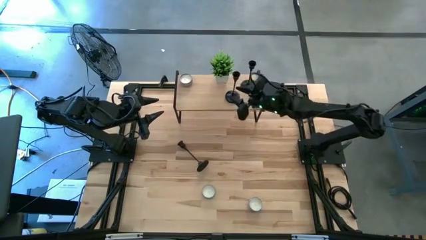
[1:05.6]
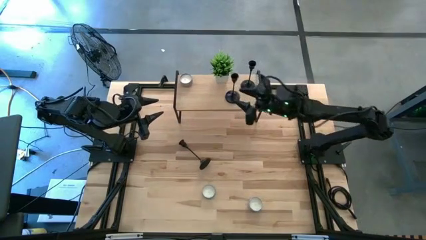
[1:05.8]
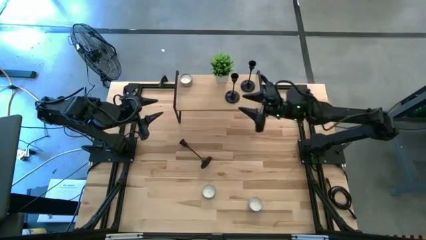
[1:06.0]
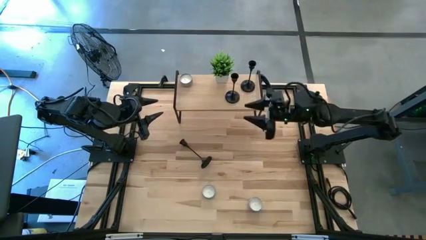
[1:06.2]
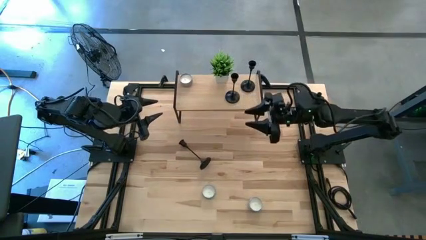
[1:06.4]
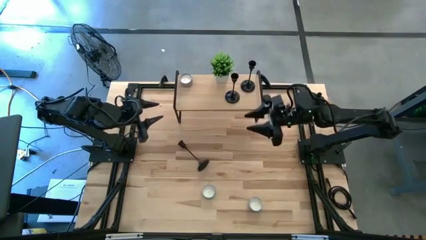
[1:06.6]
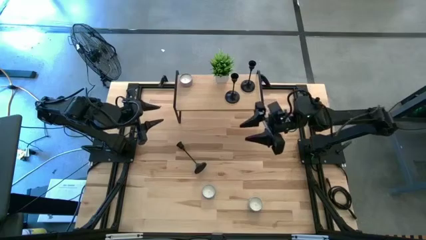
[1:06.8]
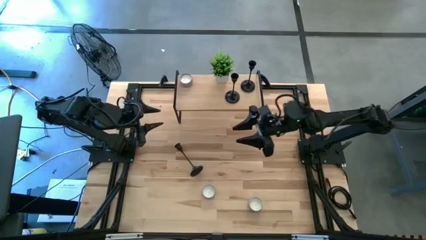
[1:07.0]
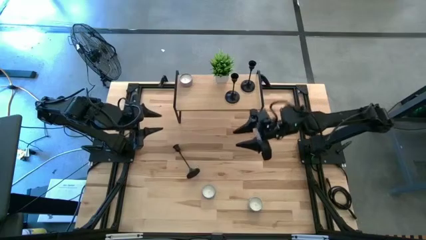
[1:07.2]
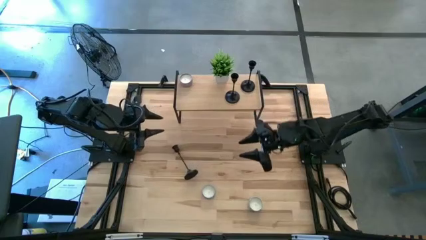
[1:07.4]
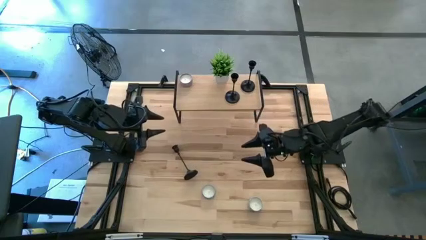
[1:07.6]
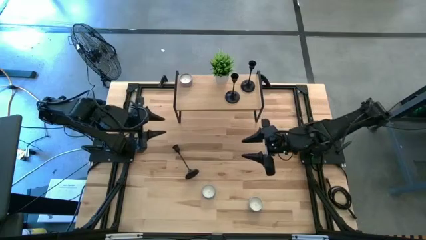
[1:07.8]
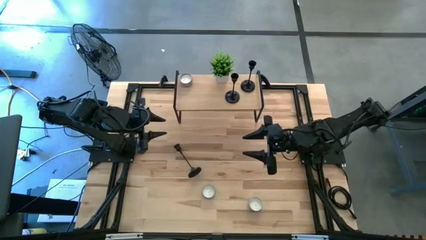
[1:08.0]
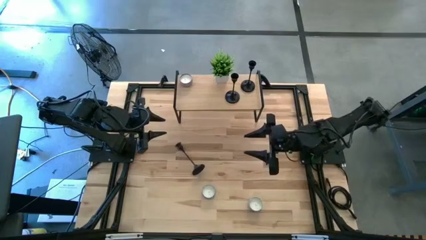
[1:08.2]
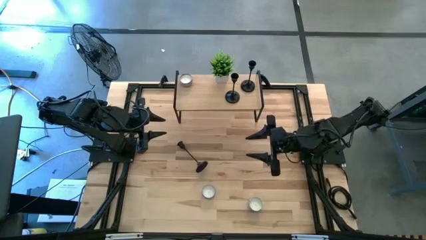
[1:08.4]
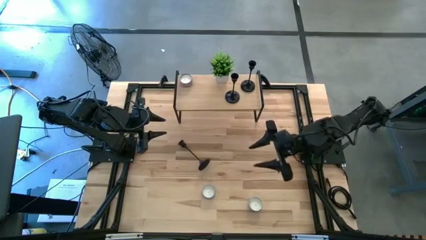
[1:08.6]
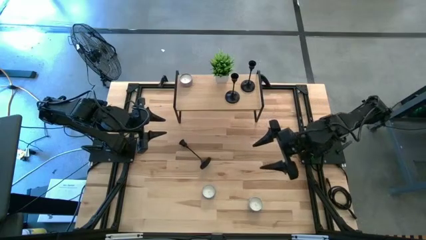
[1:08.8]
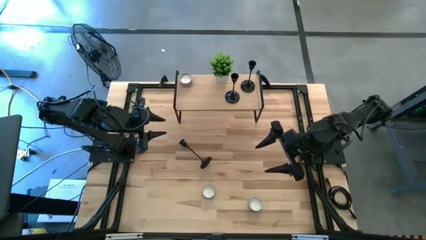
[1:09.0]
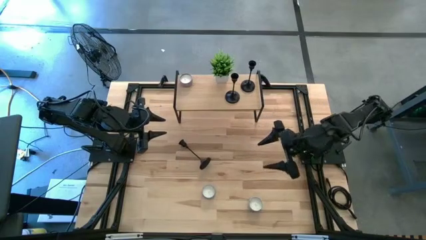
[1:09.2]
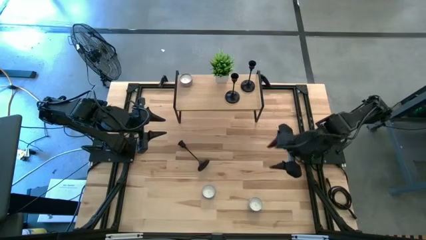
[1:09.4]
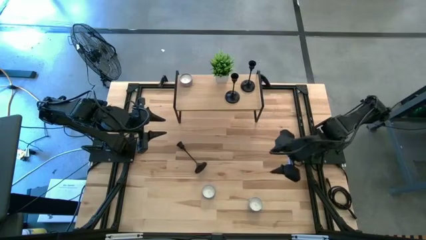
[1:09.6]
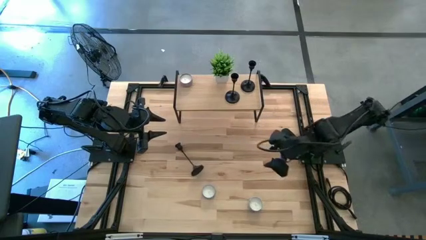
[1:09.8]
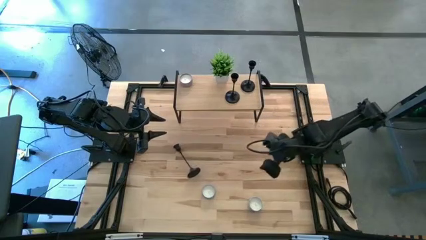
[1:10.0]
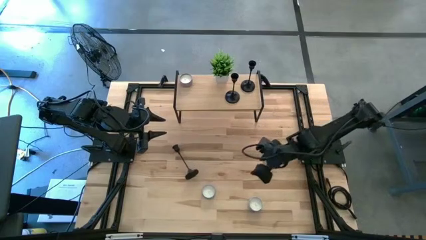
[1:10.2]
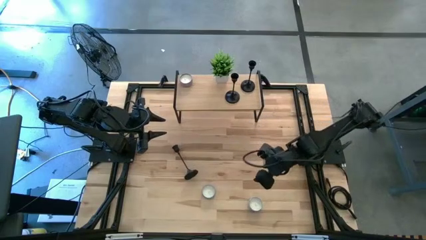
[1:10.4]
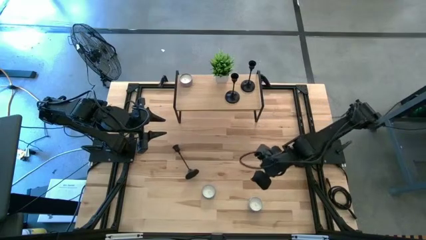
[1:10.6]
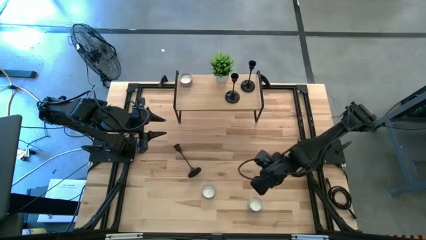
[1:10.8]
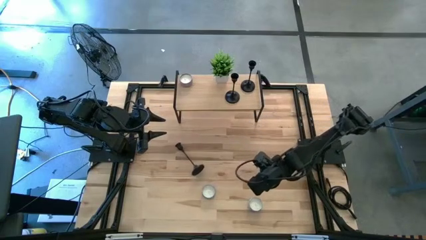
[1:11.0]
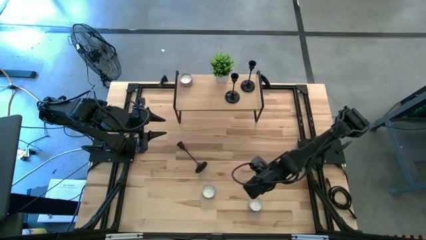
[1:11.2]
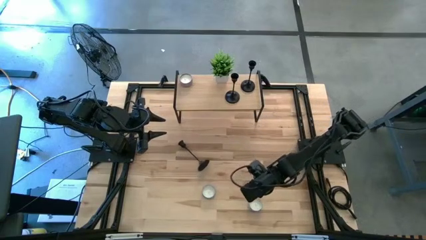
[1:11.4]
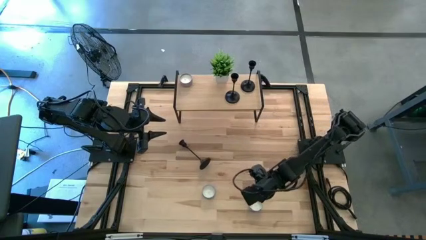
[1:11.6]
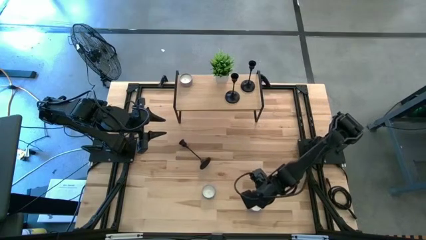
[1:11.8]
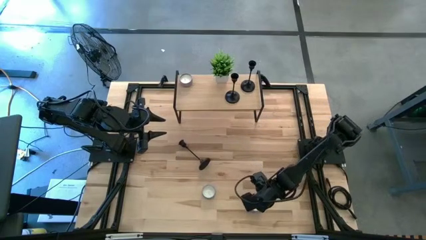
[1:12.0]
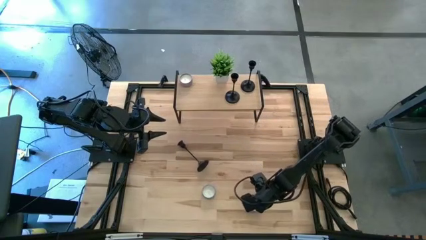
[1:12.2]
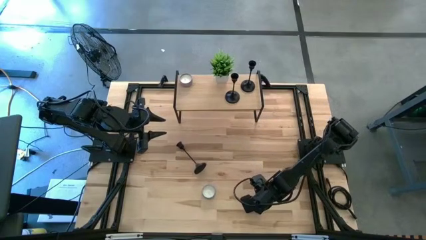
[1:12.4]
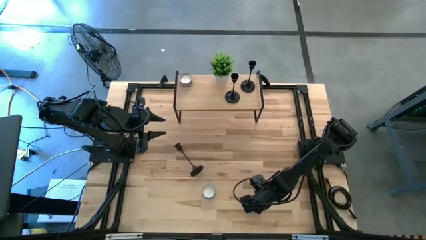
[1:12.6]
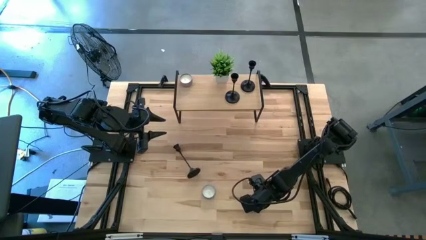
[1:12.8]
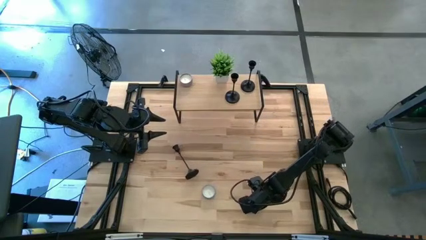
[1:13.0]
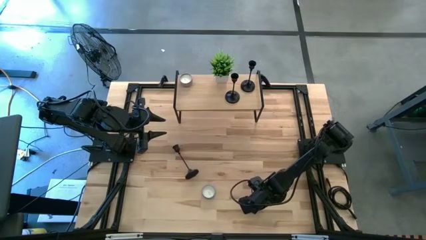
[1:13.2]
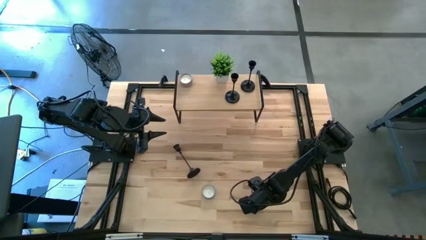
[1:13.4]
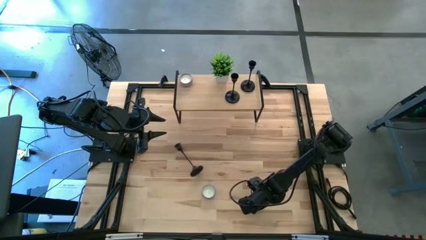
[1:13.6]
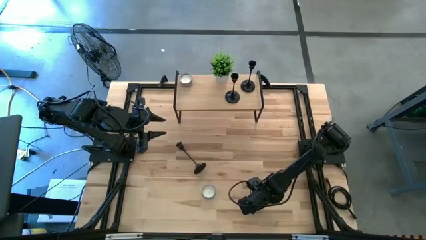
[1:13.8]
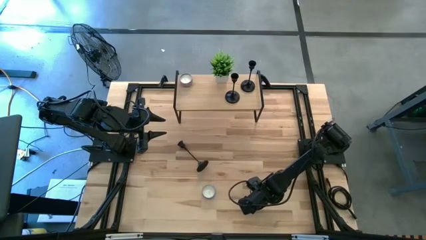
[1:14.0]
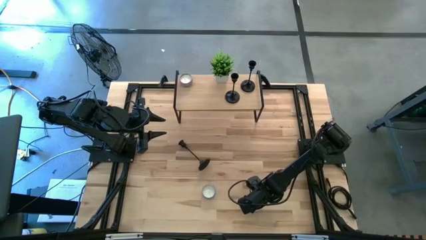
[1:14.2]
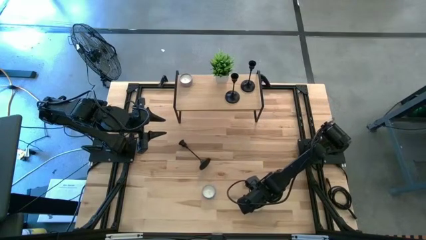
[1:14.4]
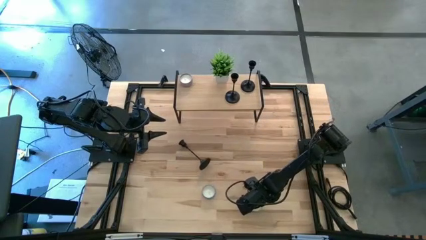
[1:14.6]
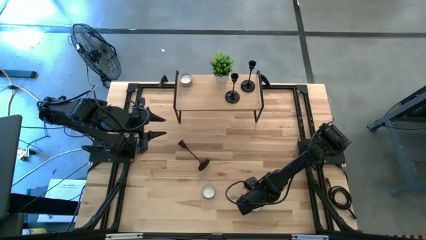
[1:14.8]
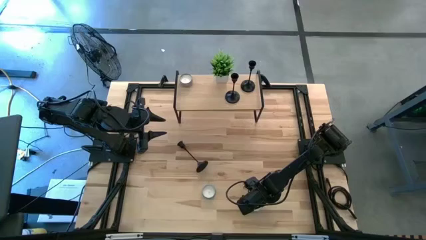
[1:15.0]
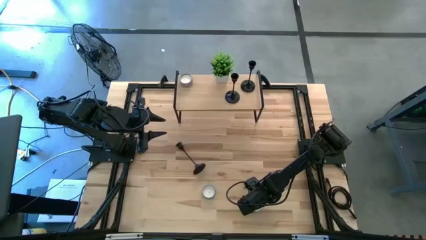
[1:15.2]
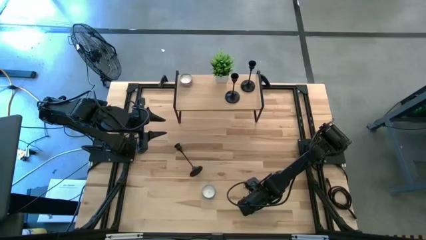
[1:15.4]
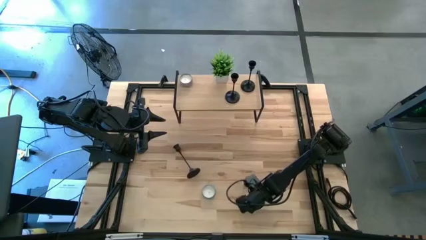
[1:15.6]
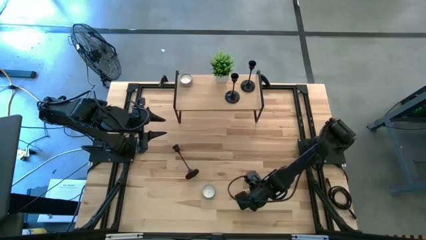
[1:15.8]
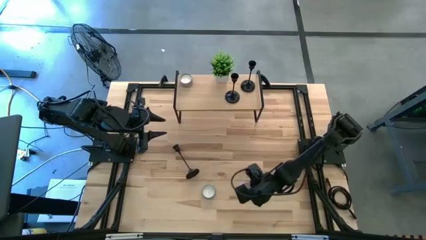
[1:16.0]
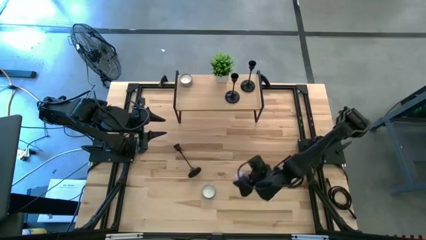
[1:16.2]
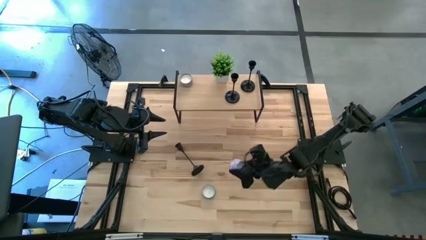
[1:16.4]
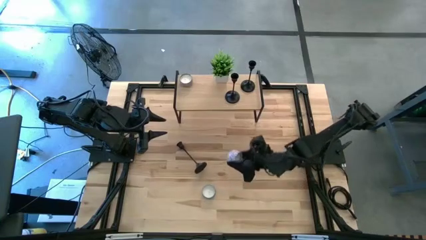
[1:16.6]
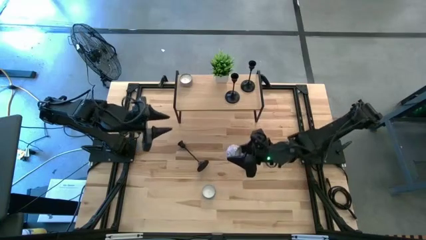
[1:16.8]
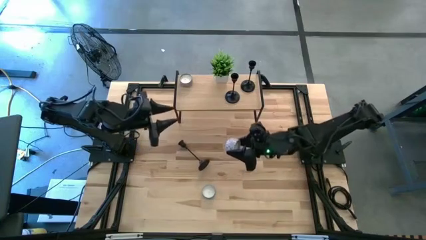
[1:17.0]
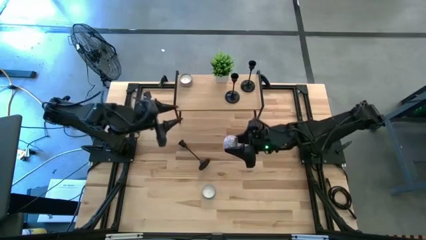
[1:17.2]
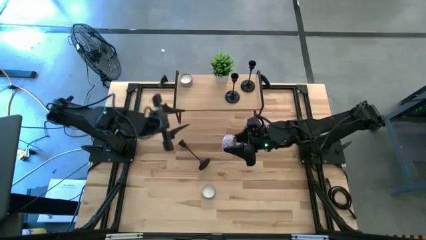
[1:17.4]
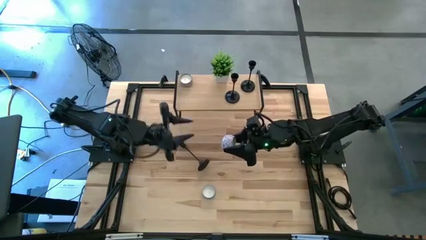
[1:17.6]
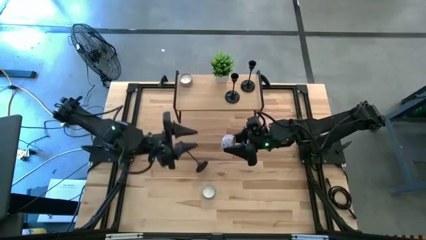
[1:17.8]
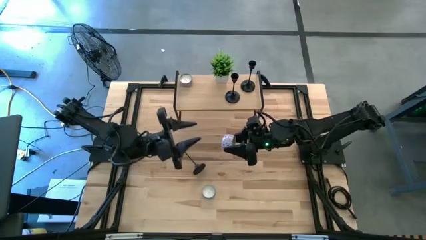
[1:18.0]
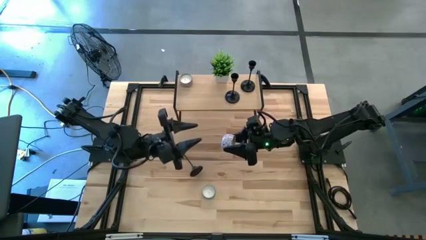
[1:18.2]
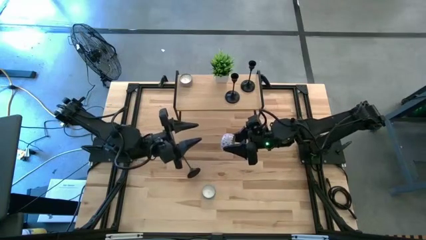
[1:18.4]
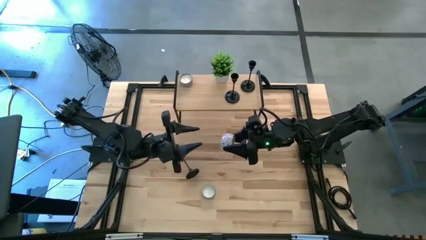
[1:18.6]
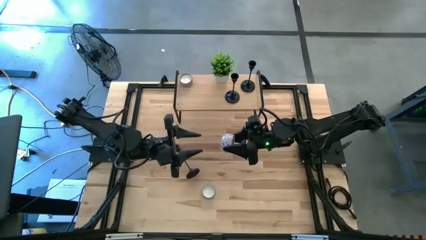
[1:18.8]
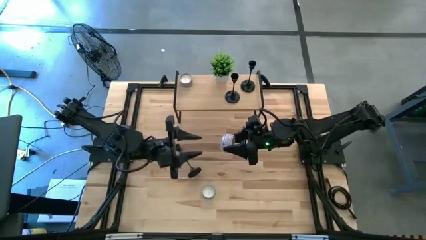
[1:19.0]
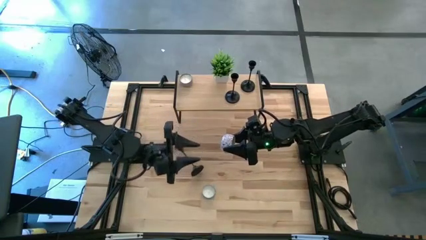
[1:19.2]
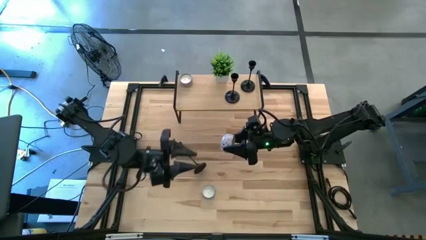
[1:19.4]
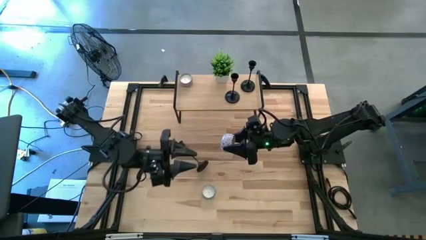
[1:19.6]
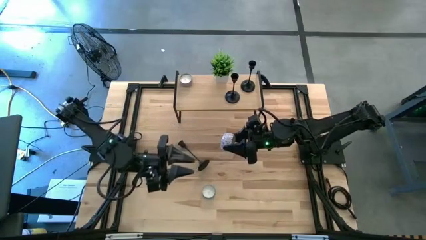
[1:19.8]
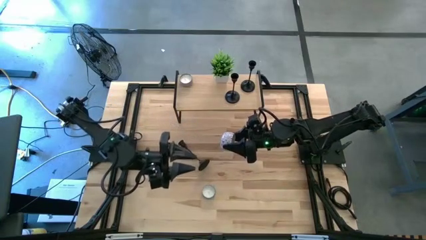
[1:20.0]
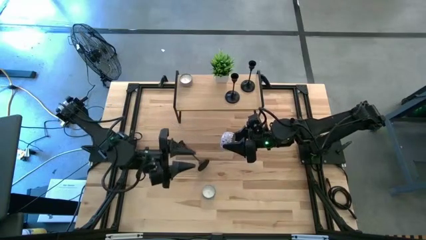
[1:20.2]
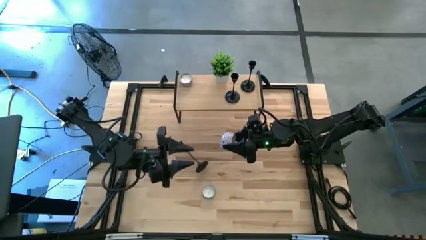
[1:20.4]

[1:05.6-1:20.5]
Task: Pick & Place candle stick holders
Put the white red scented candle on the shelf
